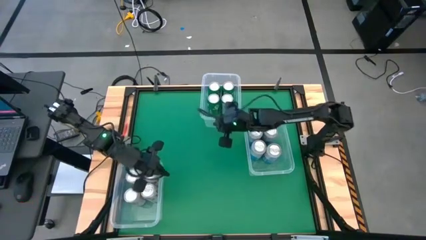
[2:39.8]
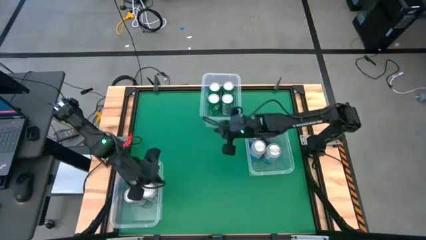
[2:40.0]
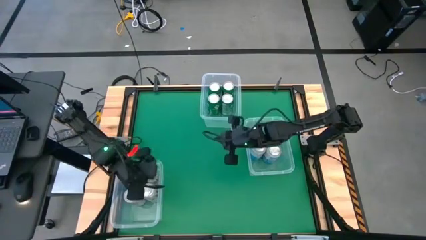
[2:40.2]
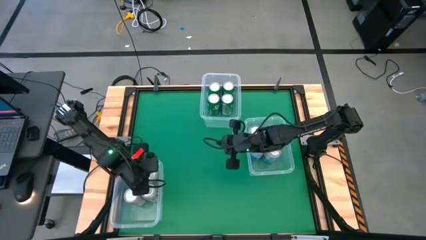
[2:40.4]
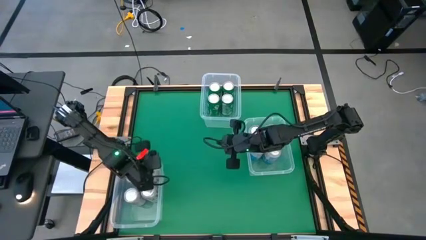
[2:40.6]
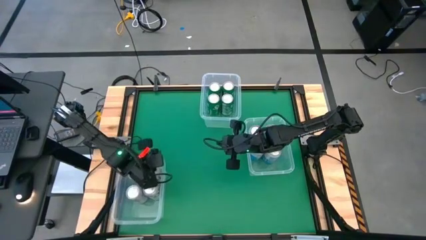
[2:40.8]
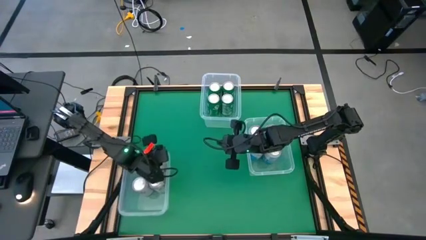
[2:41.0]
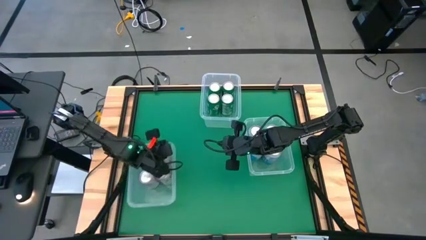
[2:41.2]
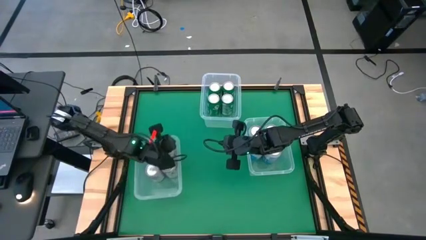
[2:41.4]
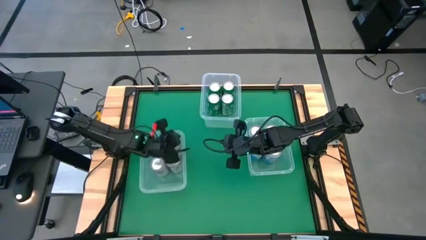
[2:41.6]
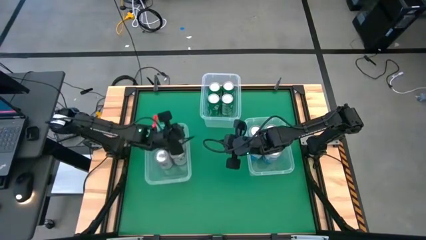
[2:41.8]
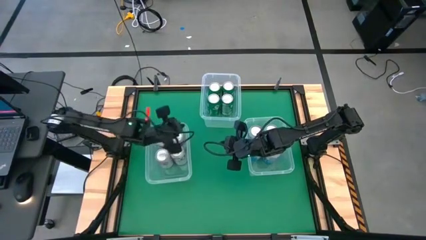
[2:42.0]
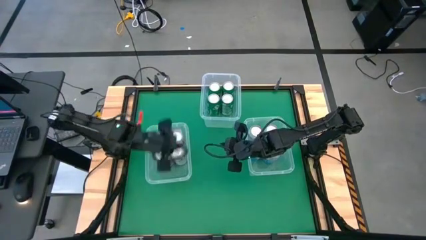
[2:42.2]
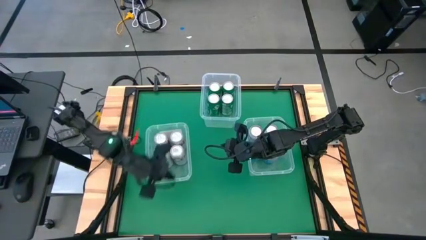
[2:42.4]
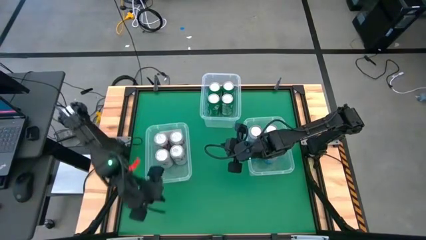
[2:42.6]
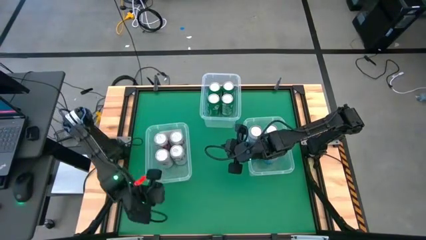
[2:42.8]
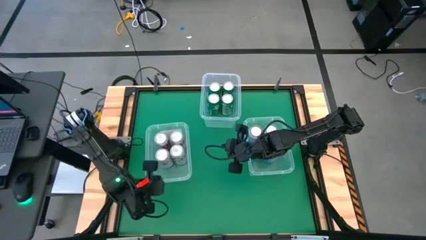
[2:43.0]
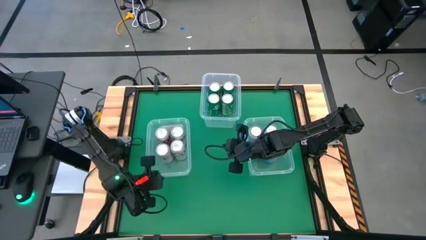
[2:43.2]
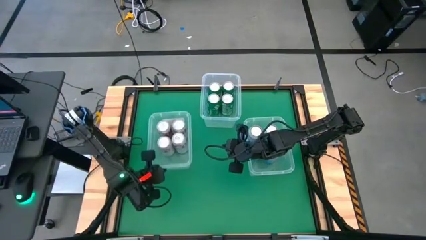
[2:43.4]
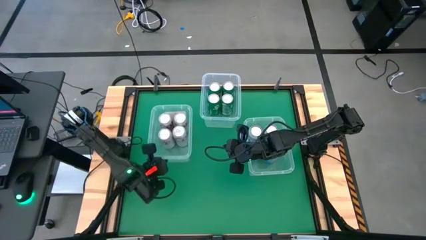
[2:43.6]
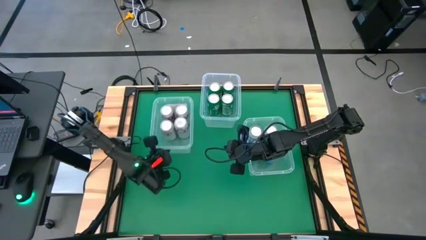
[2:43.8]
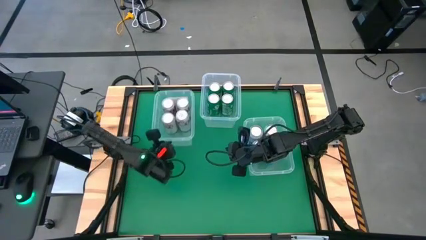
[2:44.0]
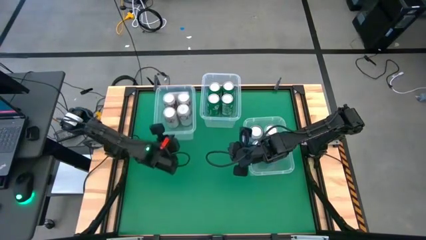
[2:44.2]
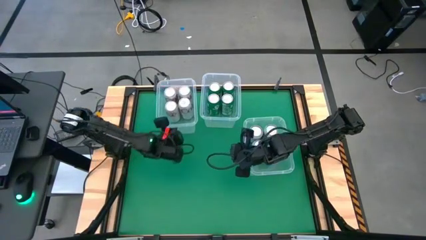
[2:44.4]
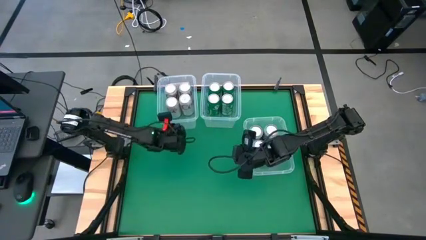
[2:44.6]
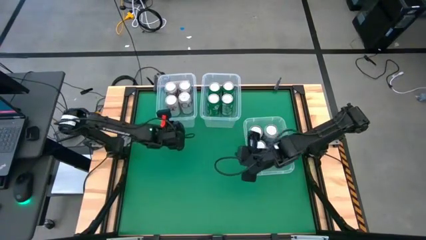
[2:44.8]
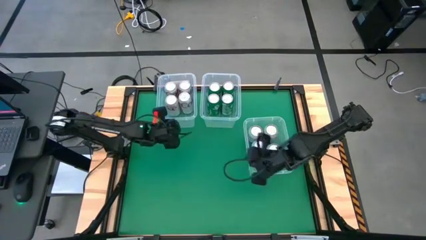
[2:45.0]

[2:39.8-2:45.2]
Task: Sort soda cans
Move the bottom transparent bin to the top left of the table

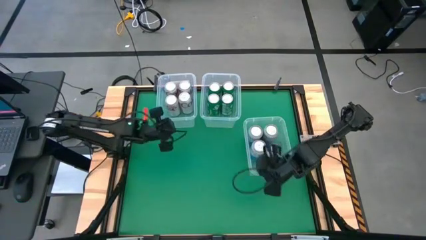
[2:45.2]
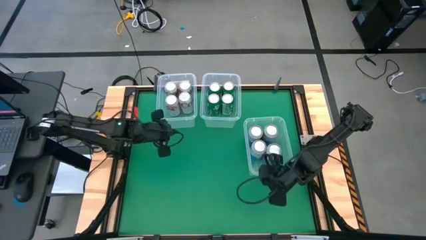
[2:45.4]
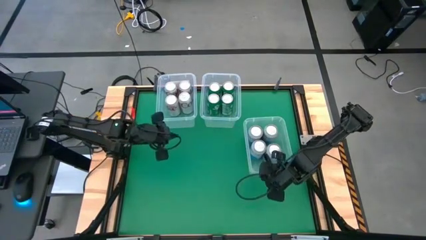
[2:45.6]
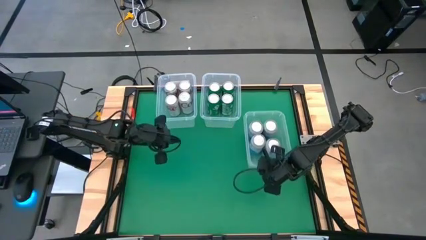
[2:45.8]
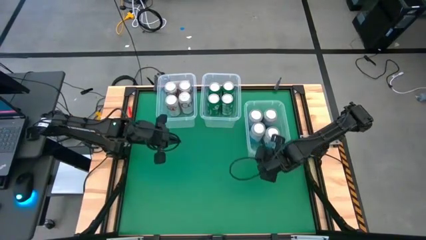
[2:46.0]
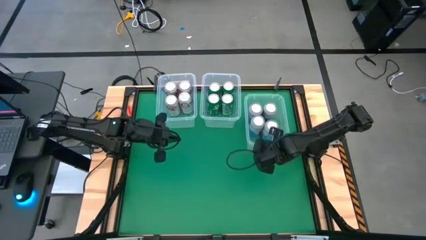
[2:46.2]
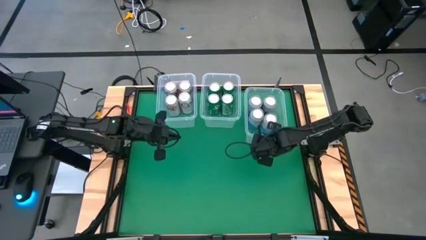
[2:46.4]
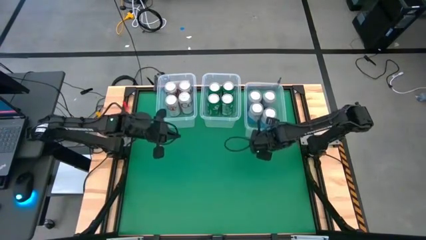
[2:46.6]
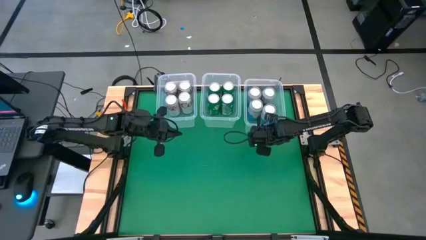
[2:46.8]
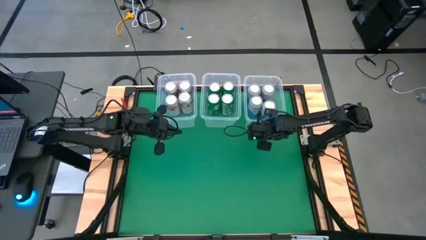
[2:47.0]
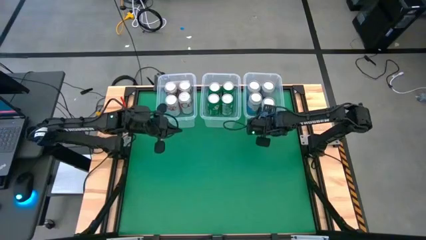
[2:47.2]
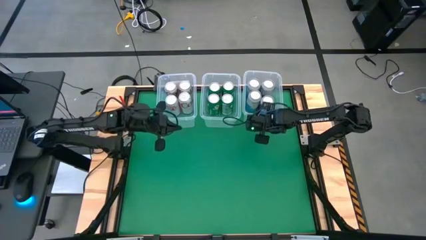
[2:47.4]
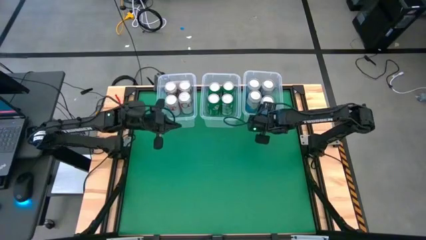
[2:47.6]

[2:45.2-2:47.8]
Move the bottom transparent bin to the top right of the table

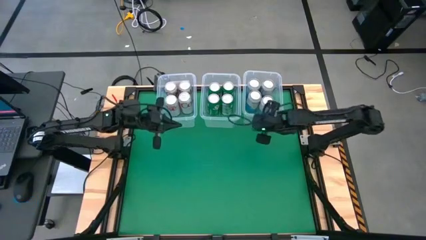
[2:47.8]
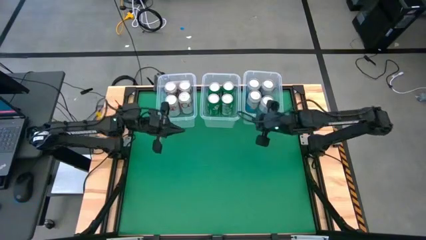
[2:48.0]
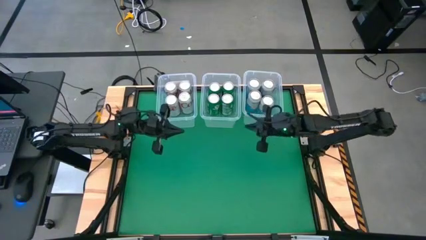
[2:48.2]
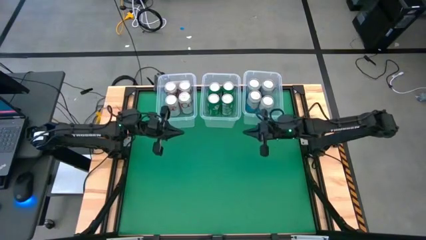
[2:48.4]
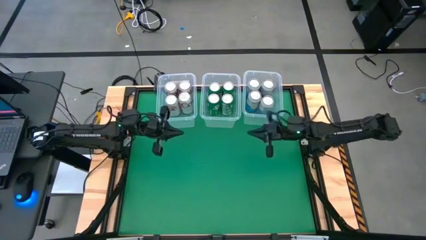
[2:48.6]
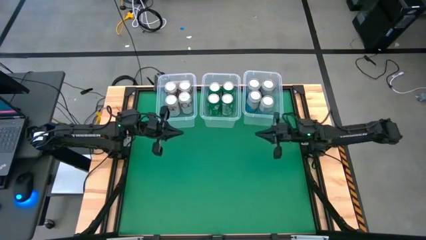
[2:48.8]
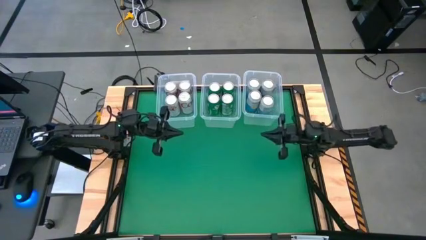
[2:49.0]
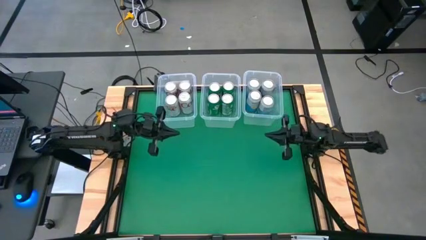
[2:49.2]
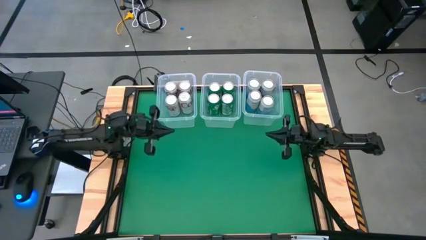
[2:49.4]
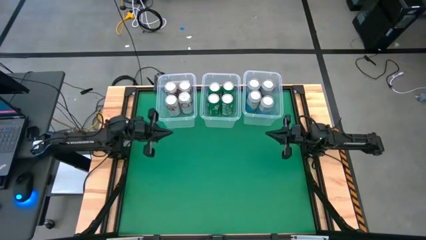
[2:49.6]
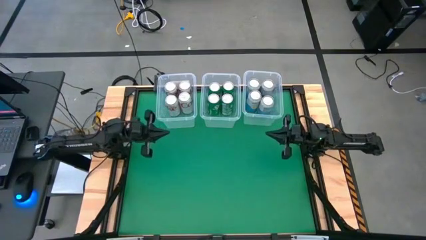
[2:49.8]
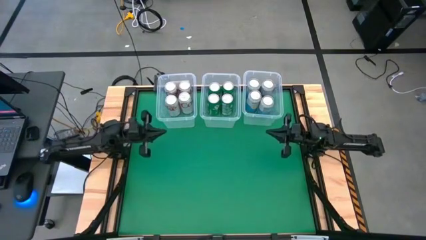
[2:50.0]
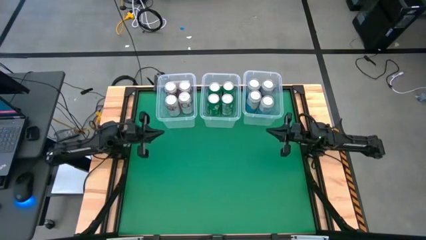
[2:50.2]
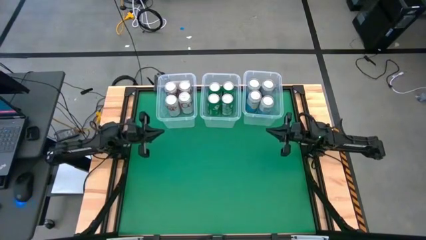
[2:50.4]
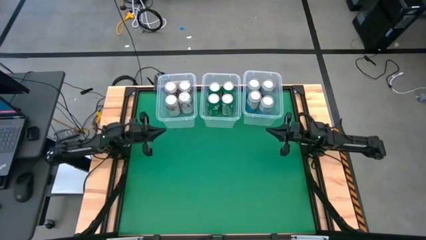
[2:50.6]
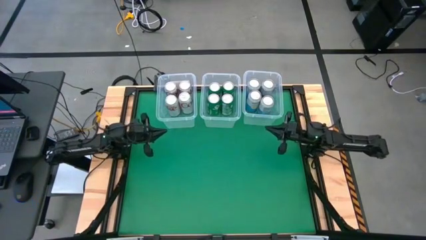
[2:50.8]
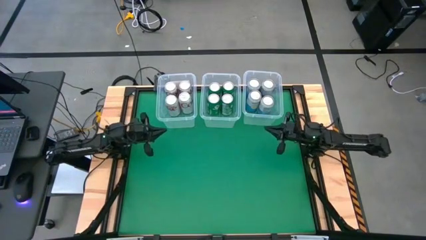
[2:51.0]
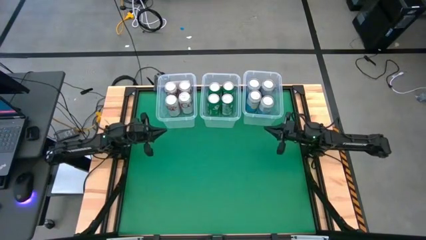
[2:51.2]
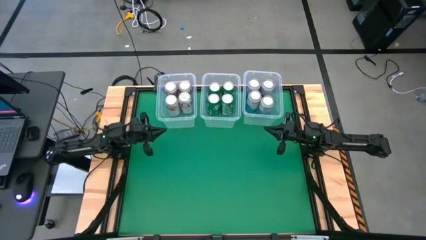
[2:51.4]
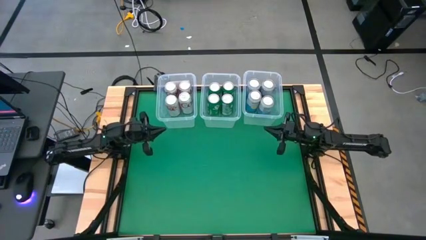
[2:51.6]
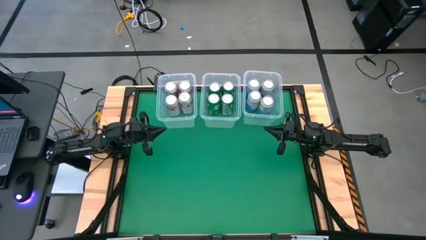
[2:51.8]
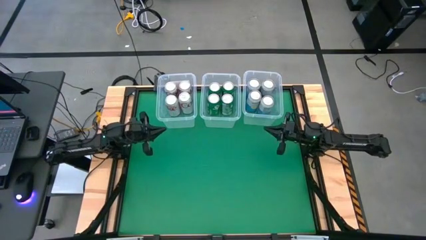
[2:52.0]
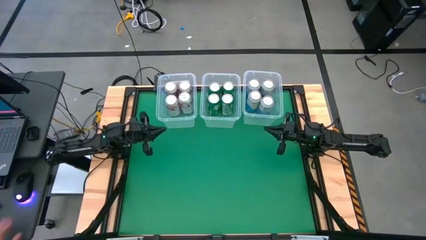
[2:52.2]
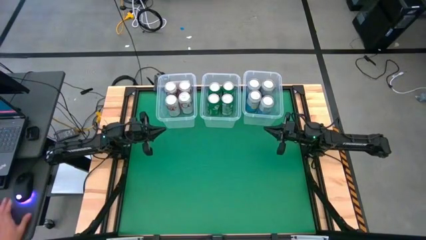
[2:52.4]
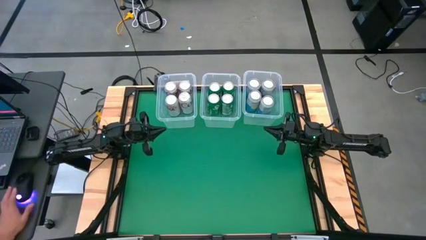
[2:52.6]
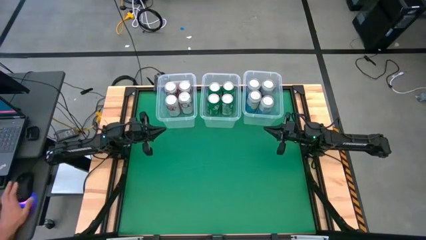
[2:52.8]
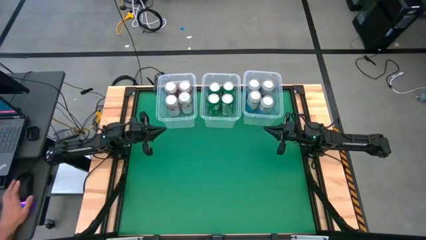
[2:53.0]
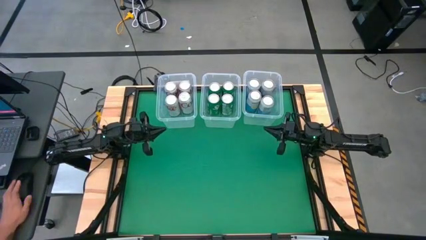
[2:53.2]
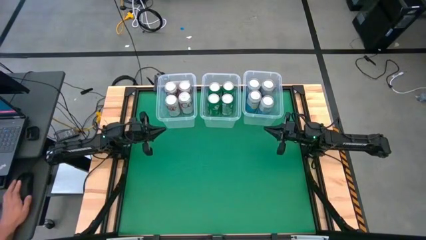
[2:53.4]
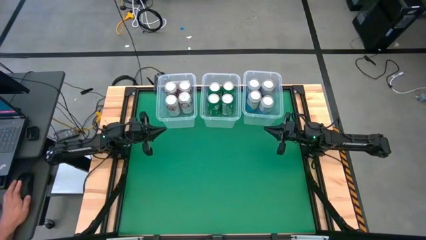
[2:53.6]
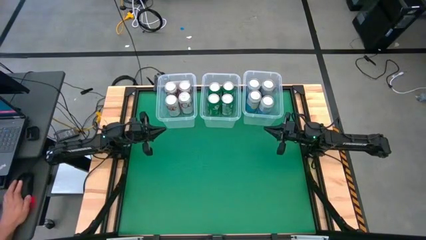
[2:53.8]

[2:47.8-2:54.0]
Return to Home Position

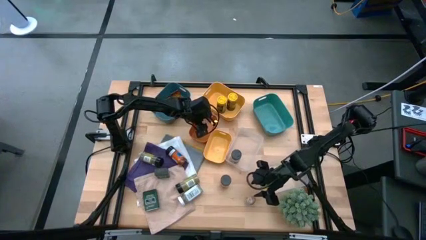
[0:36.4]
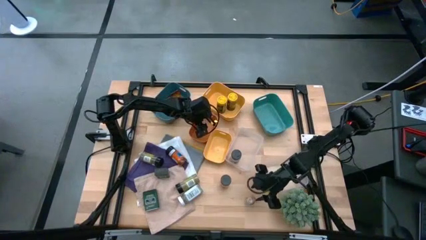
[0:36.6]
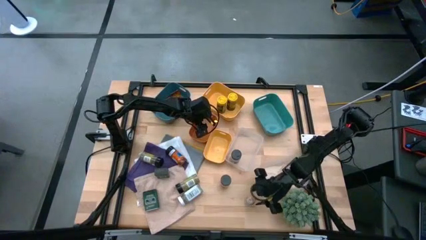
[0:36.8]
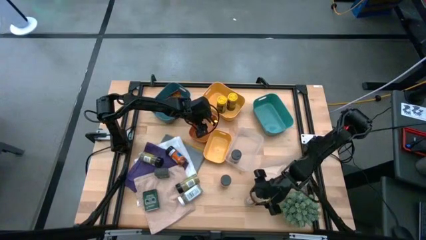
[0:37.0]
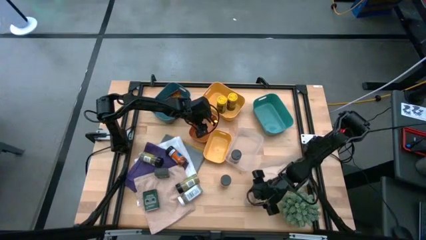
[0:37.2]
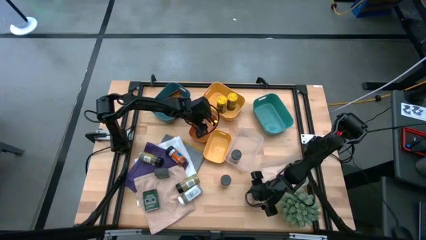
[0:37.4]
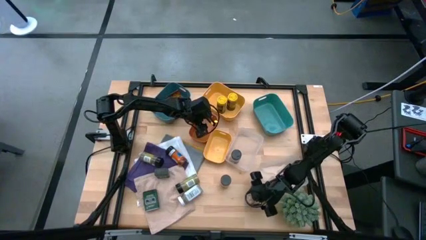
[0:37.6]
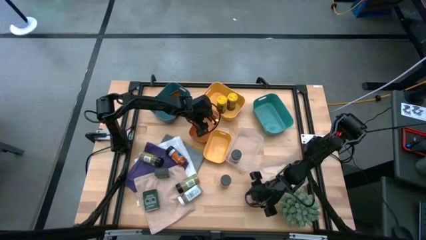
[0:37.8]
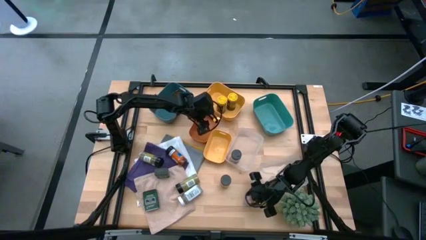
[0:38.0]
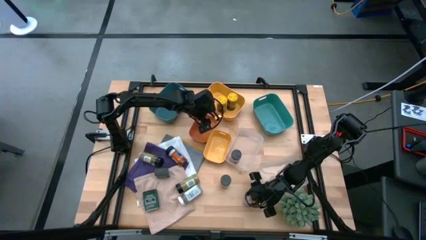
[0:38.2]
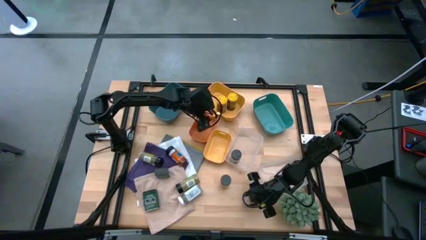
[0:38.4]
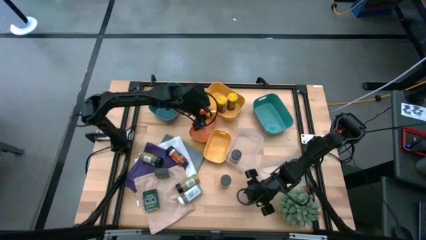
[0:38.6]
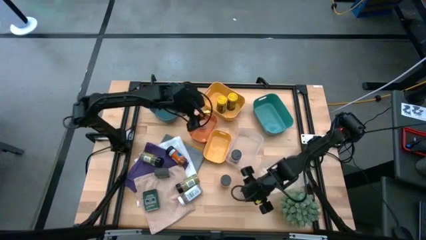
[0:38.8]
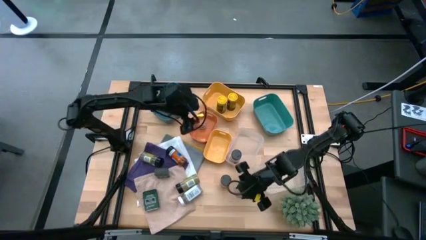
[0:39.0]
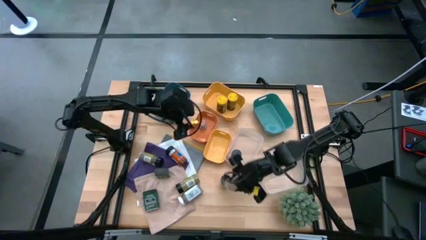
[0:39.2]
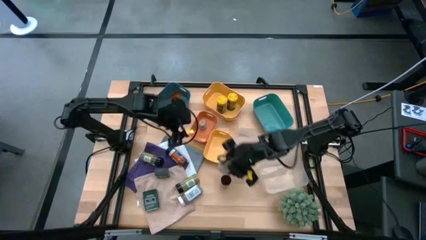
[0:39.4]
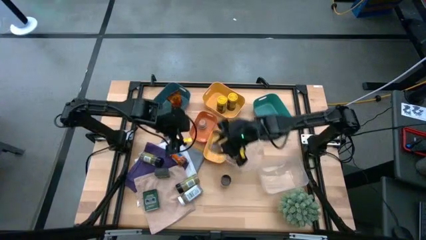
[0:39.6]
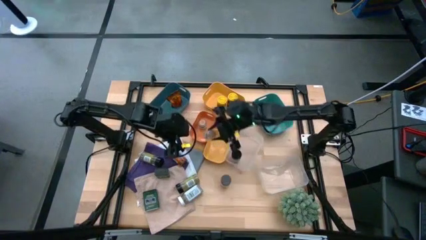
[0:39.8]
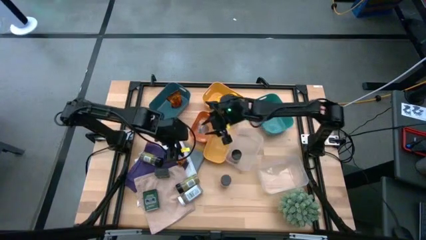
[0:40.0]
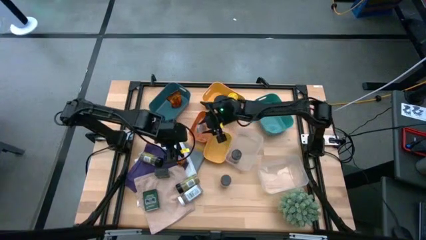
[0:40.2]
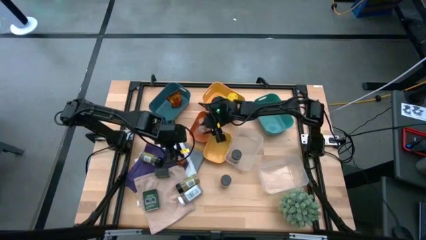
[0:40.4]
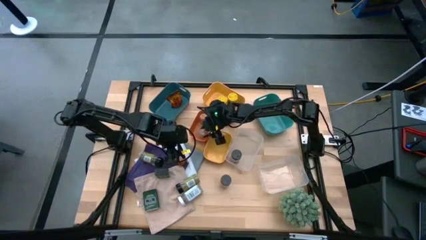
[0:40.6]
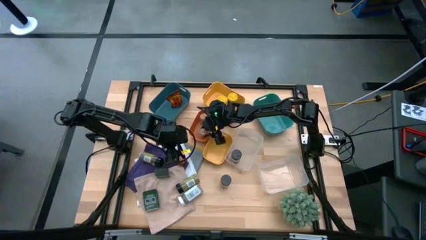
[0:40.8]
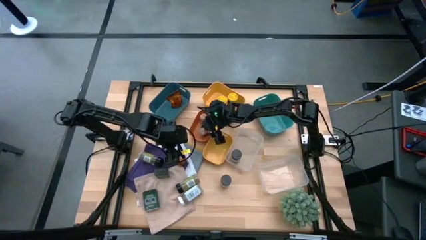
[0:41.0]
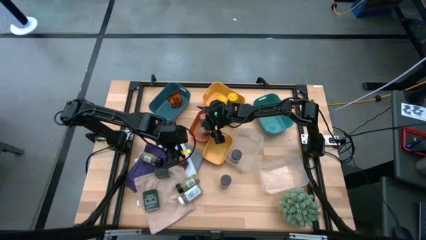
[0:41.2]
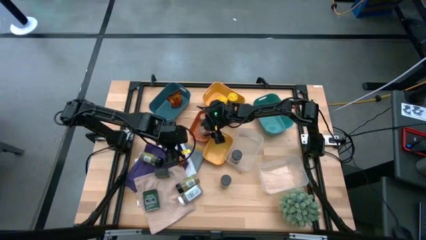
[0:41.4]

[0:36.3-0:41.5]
Task: Sort spices by type
Put the brown seasoning bottle into the orange bin
